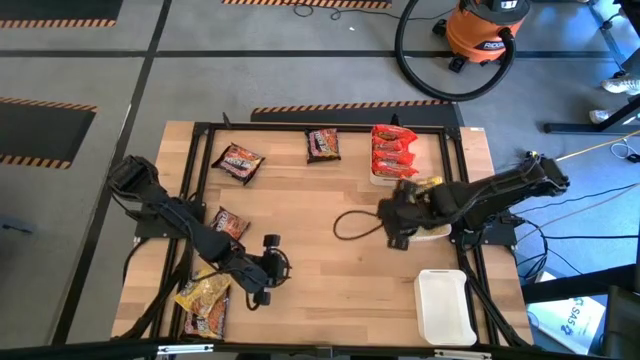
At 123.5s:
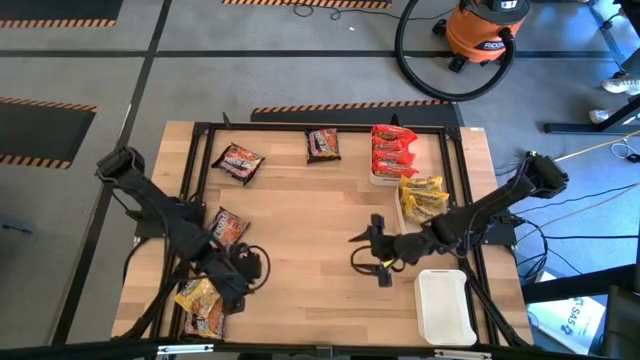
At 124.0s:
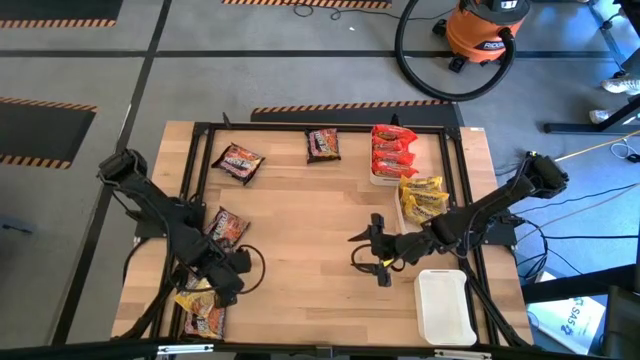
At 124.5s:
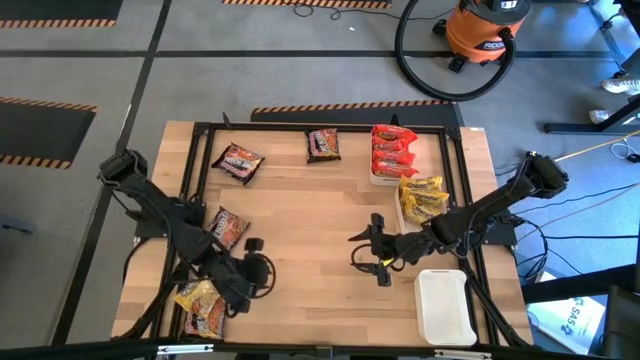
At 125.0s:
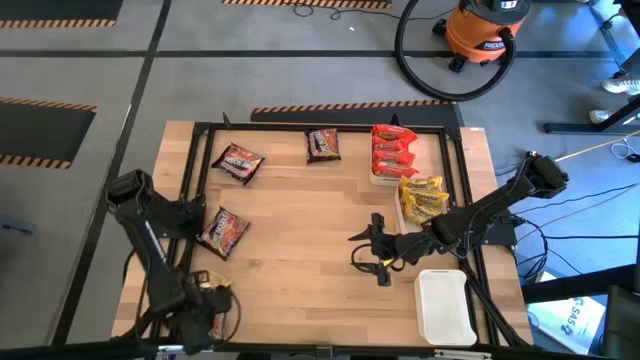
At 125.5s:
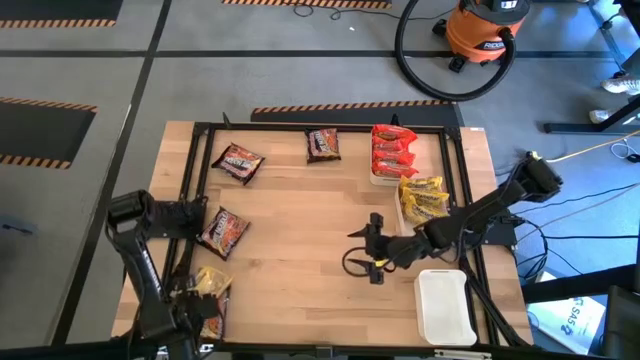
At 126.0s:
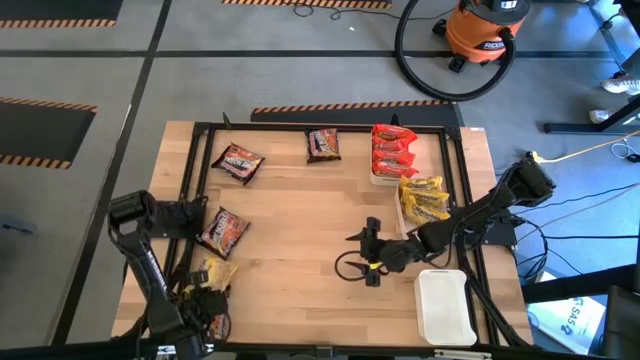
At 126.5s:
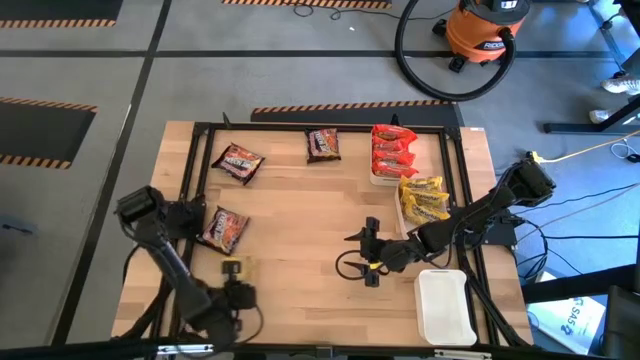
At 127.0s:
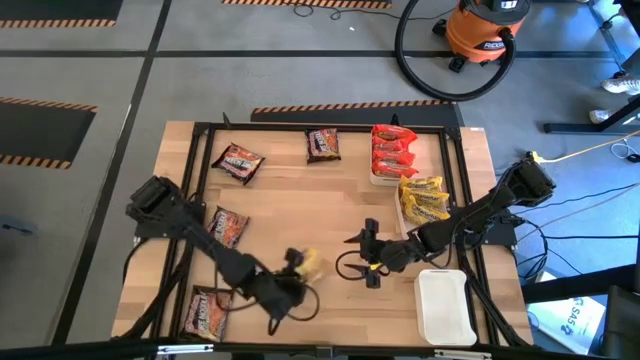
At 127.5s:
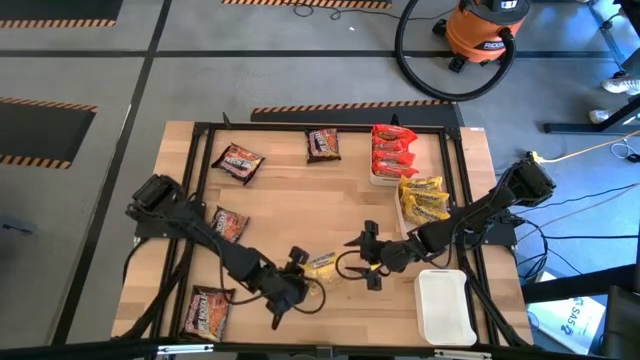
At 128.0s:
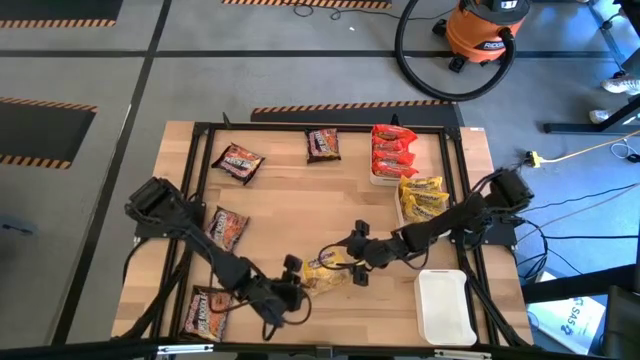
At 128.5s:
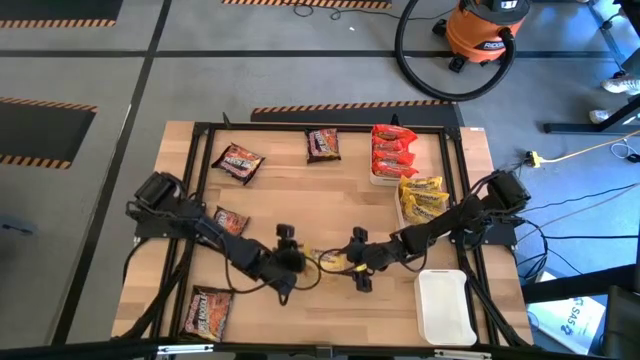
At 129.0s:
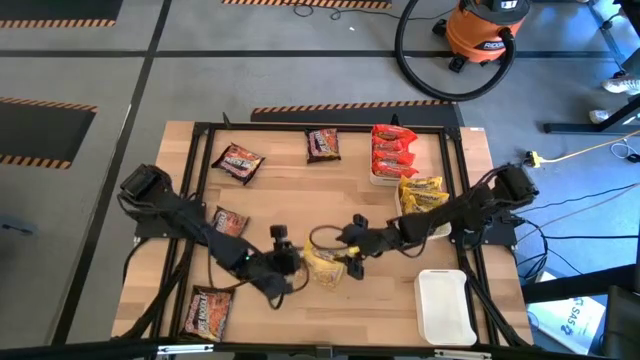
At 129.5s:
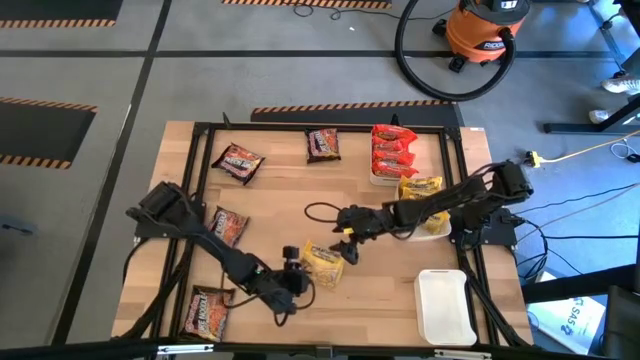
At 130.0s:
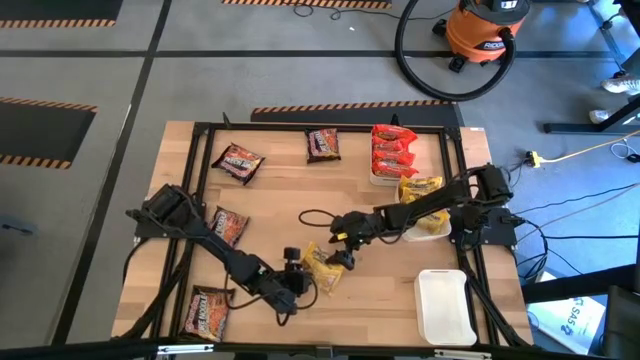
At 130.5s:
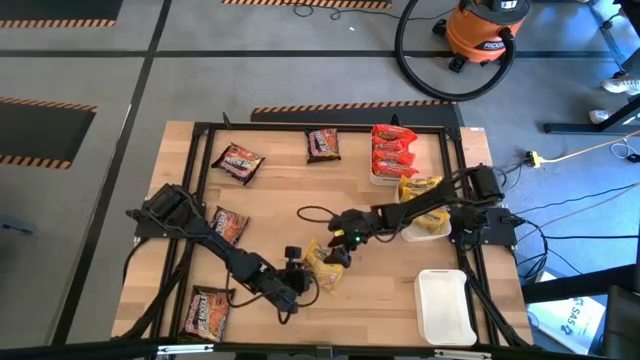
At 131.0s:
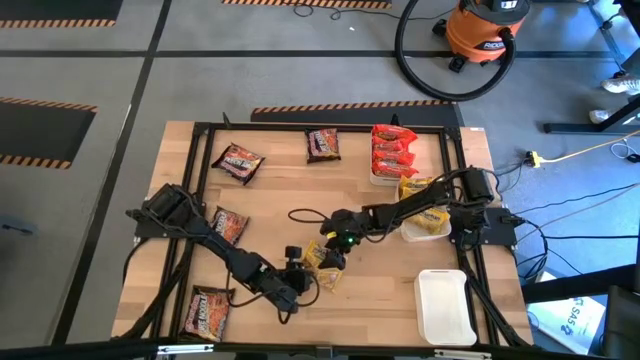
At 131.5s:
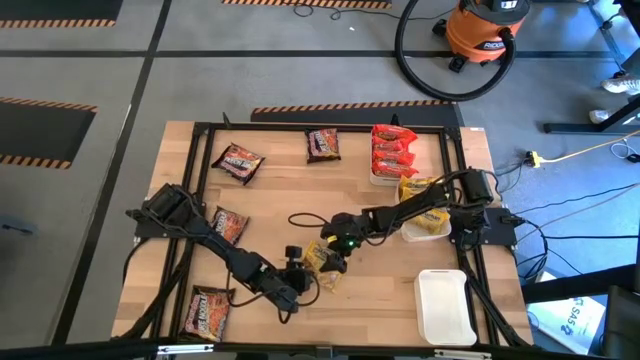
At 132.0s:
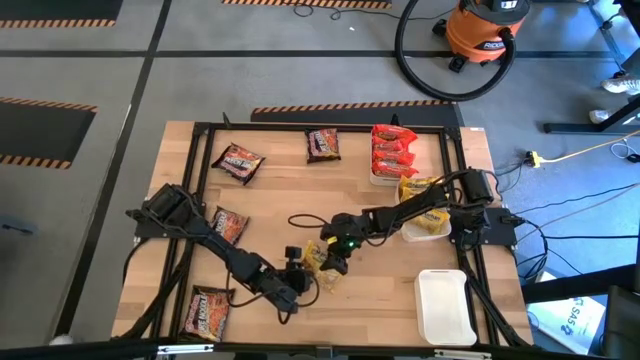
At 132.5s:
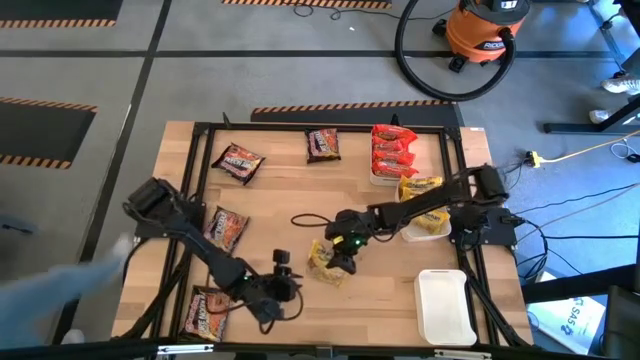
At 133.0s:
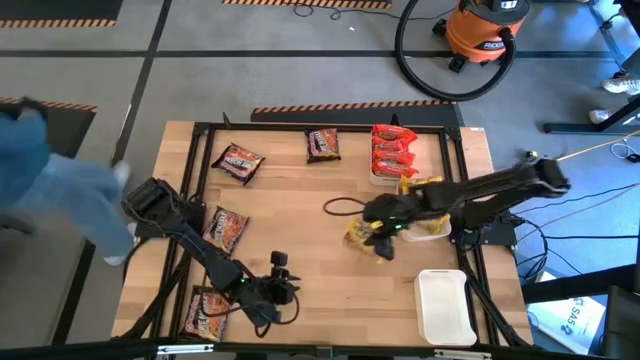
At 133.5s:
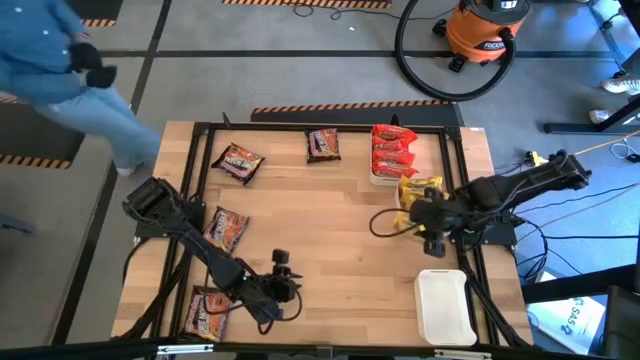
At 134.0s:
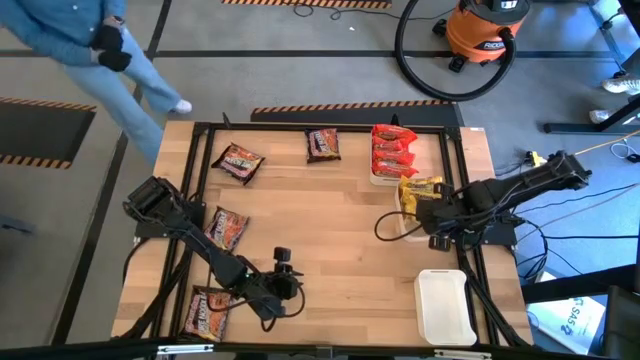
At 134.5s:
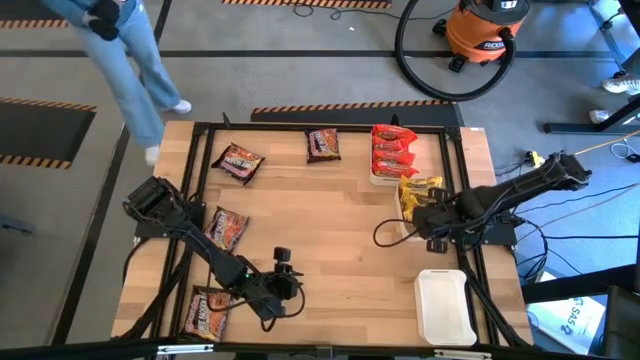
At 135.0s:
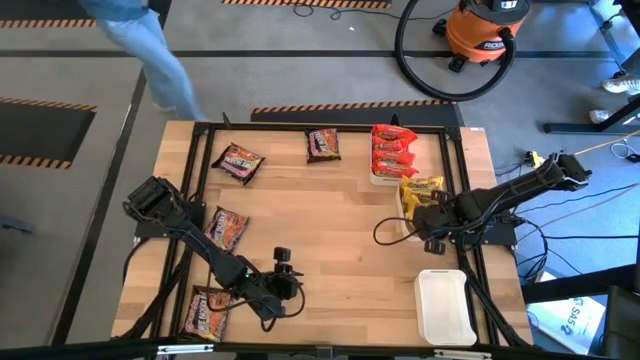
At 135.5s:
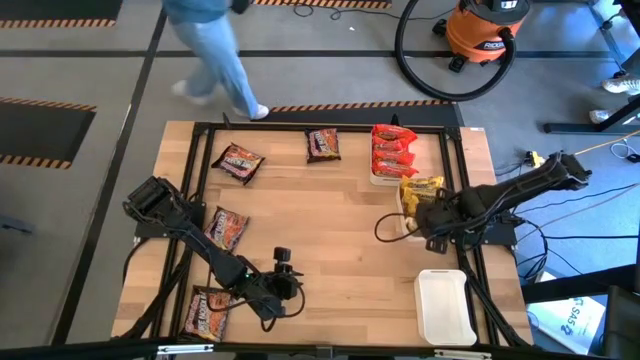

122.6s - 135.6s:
Task: Sort Maruchan noodles
Put the yellow noodle pack into the middle white bin

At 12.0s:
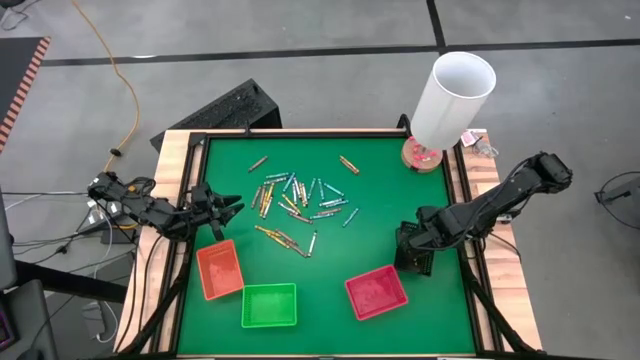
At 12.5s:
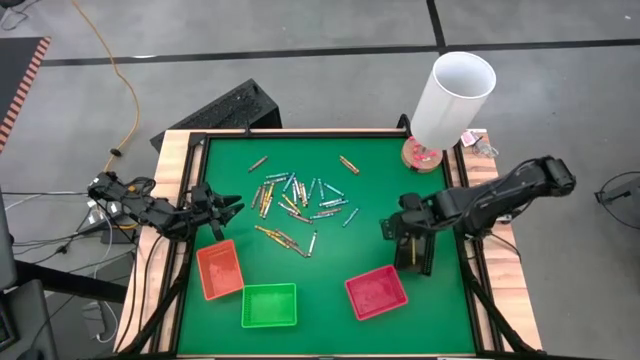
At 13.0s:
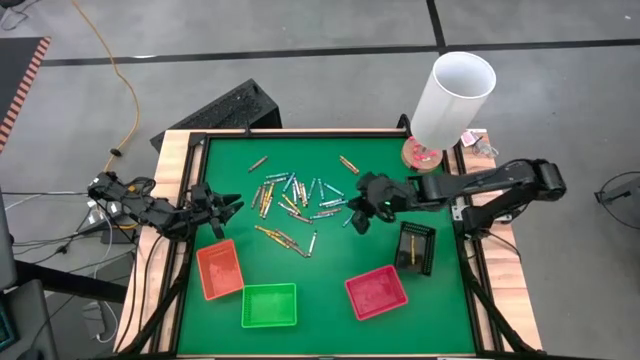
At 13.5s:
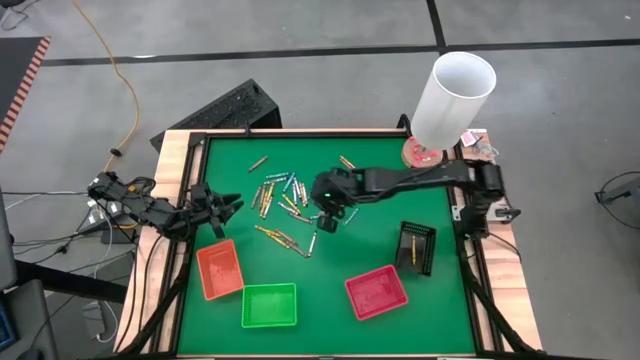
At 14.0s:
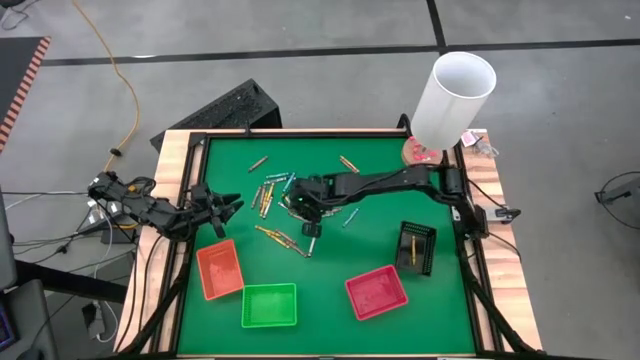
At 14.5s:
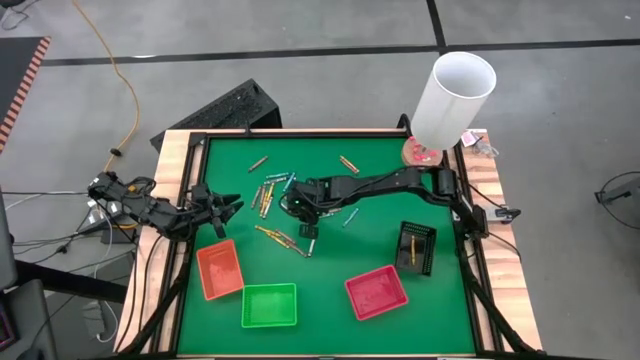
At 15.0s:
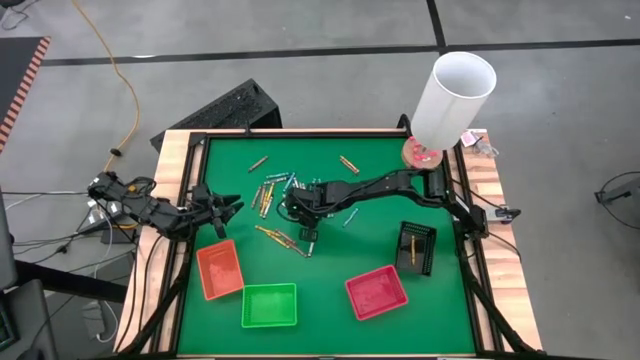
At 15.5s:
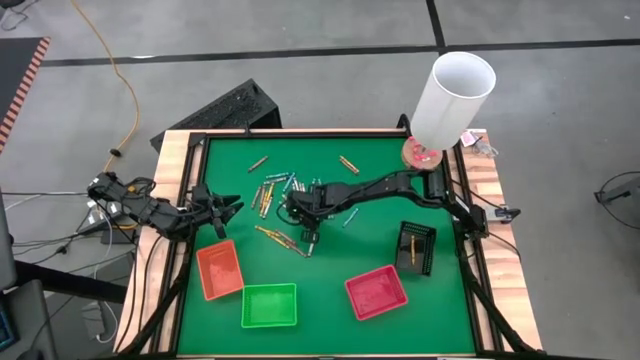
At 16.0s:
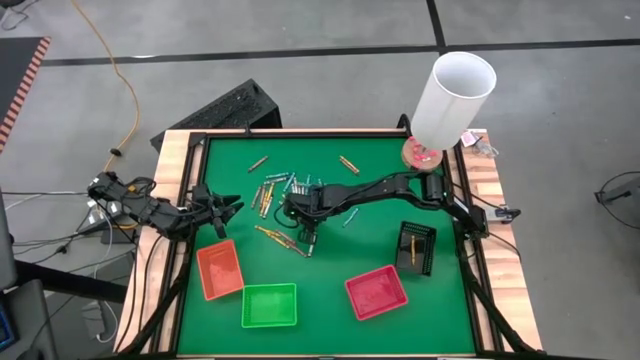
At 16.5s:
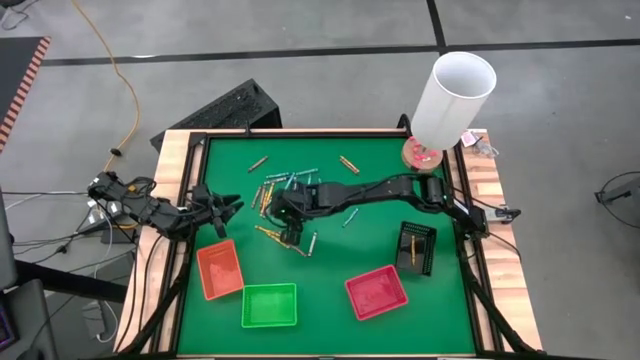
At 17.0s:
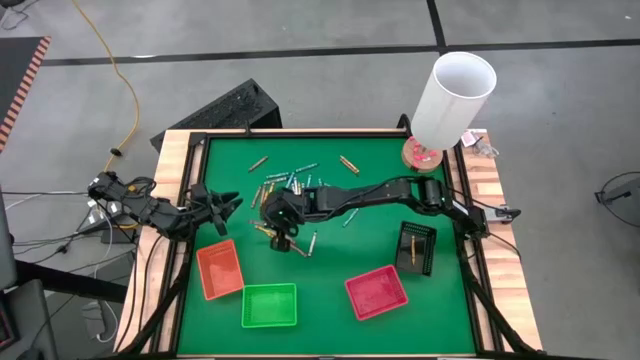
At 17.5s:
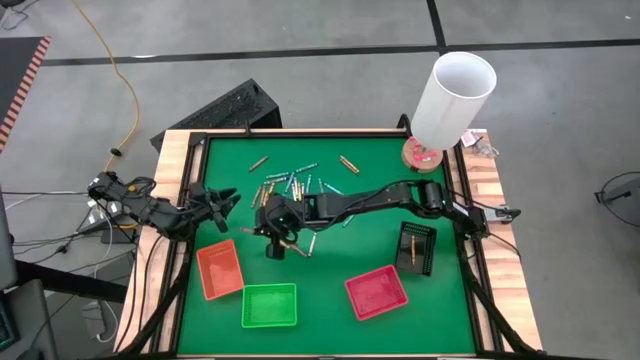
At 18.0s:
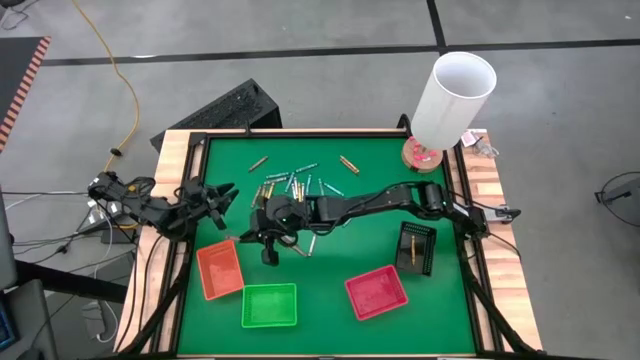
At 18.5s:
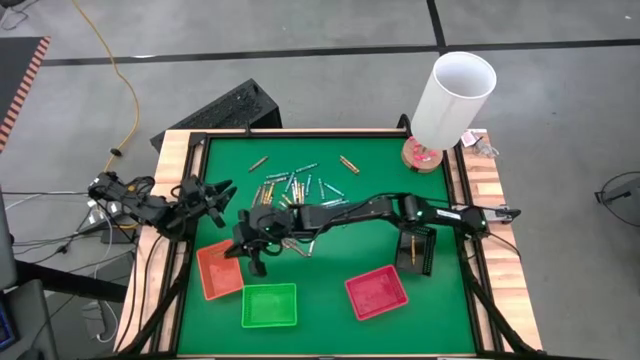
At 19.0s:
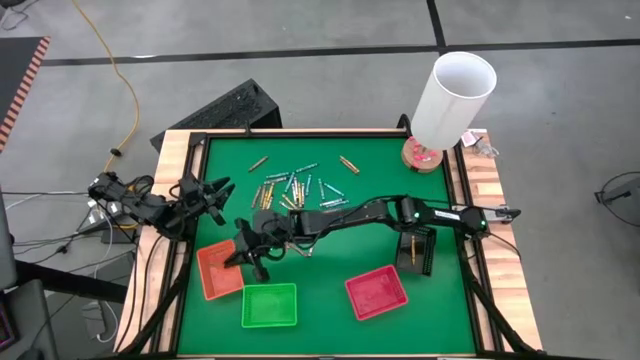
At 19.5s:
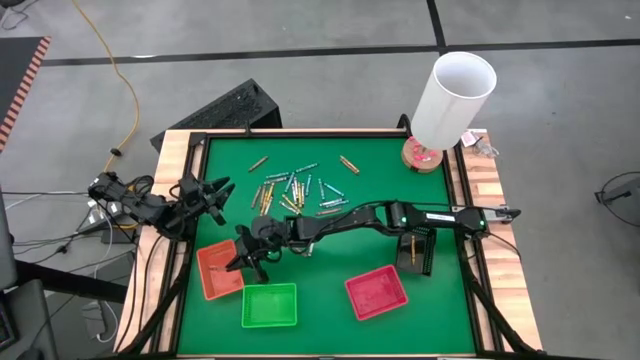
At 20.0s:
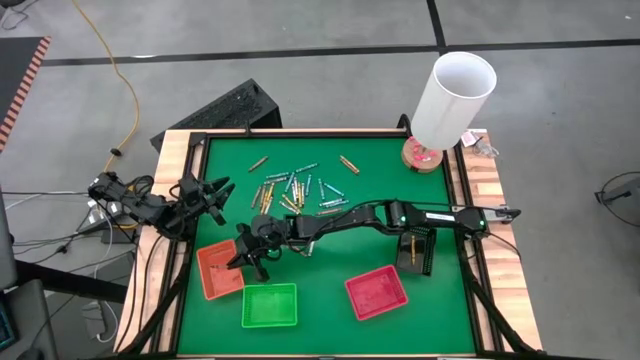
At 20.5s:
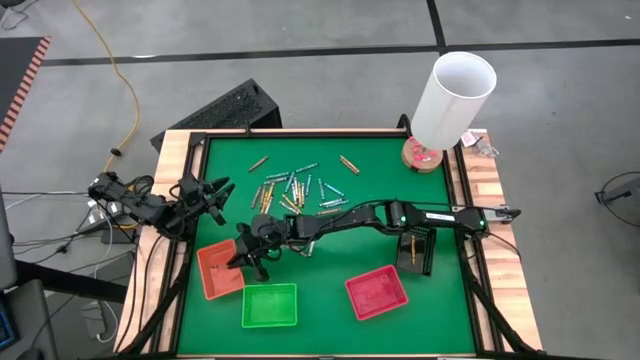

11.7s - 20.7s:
Task: Sort crayons
Put the brown crayon into the orange bin
